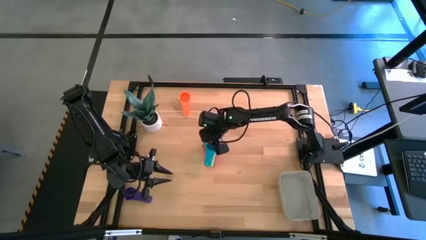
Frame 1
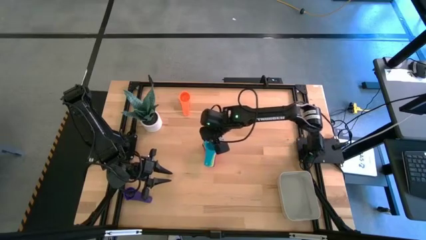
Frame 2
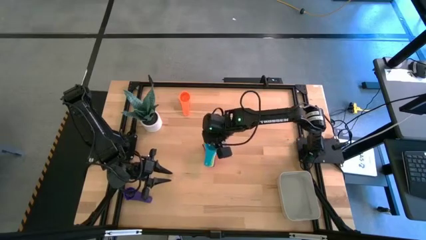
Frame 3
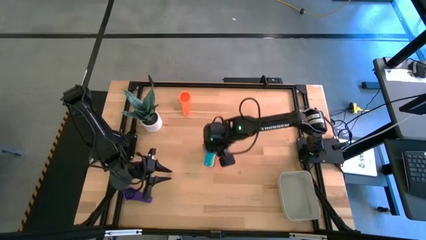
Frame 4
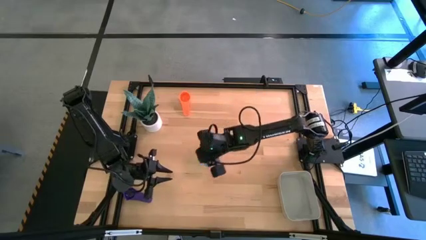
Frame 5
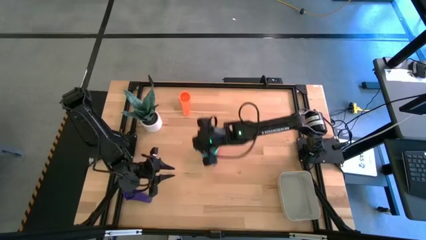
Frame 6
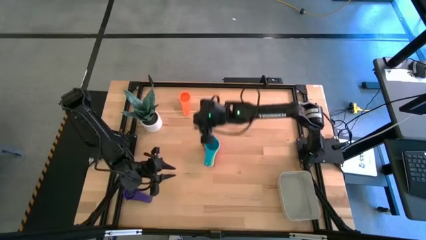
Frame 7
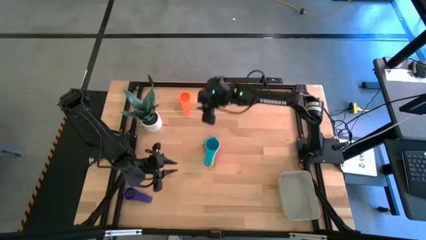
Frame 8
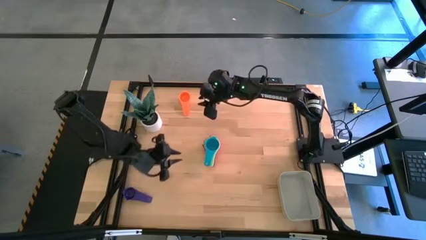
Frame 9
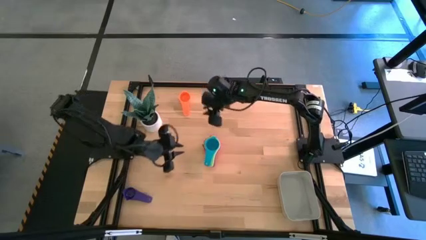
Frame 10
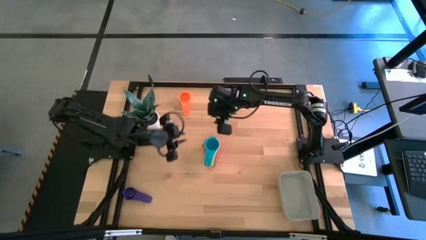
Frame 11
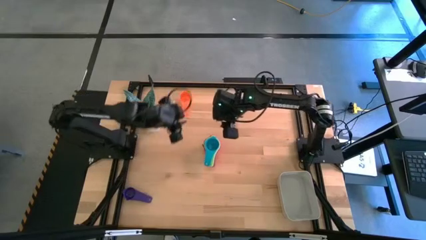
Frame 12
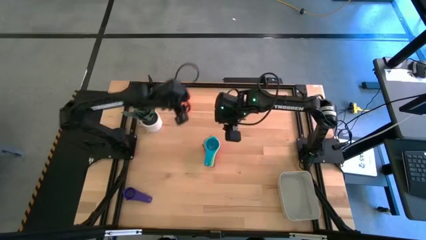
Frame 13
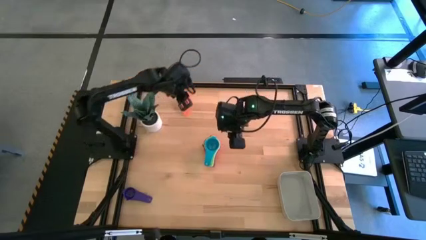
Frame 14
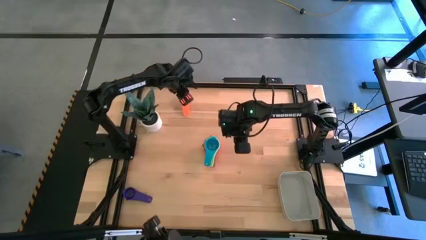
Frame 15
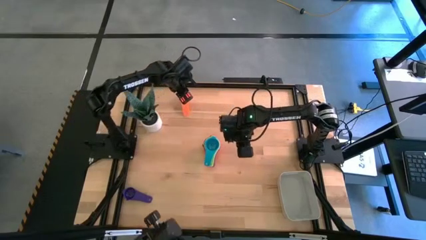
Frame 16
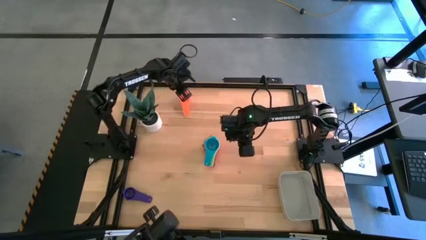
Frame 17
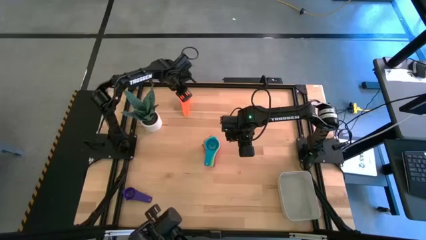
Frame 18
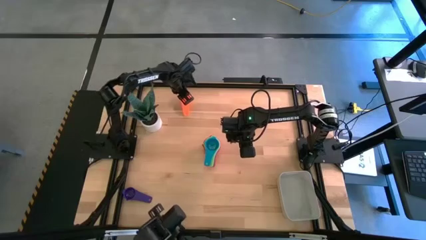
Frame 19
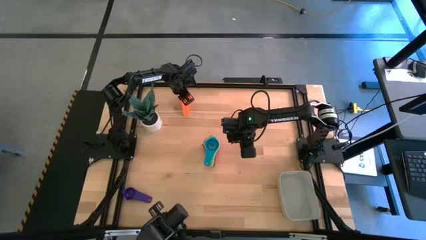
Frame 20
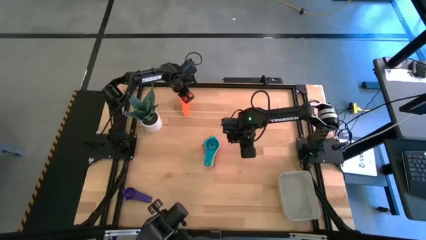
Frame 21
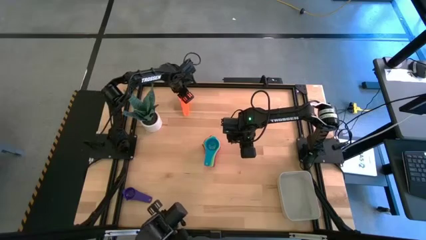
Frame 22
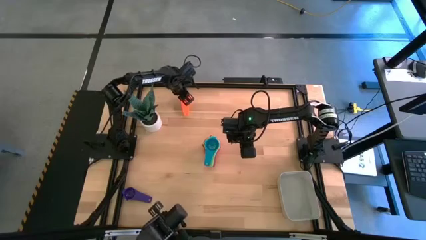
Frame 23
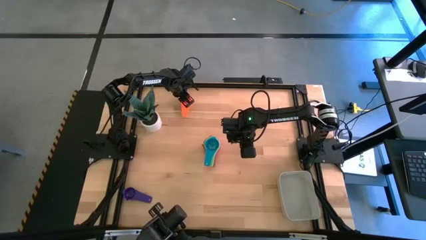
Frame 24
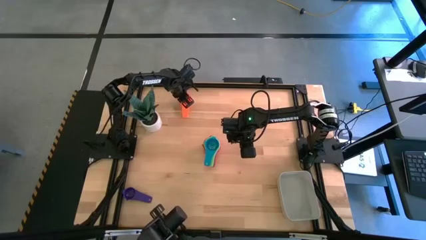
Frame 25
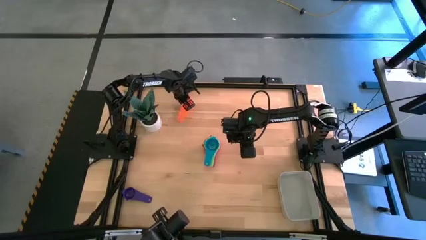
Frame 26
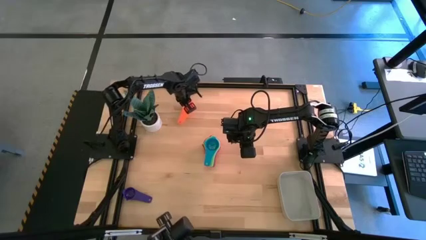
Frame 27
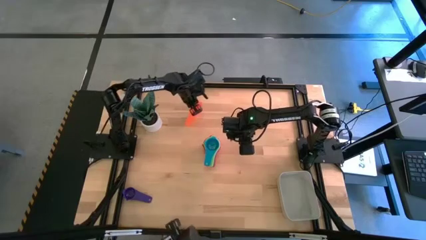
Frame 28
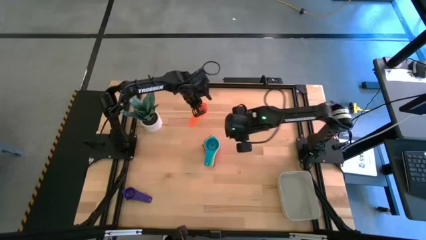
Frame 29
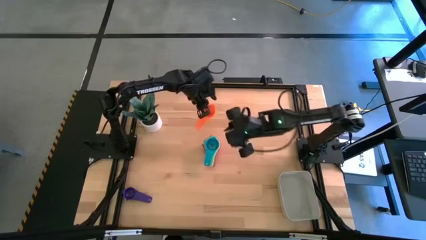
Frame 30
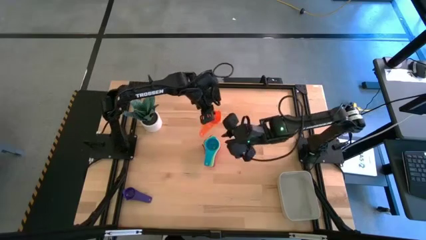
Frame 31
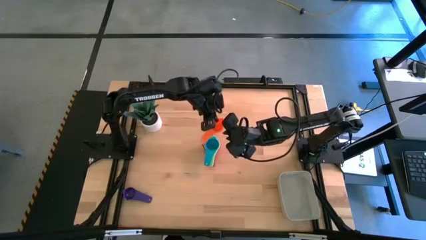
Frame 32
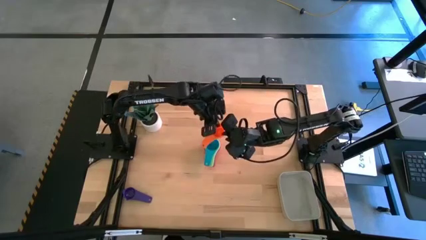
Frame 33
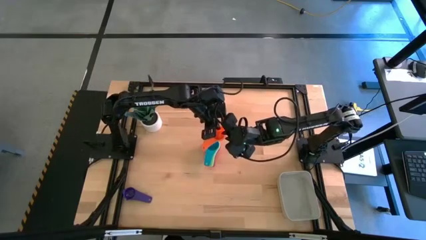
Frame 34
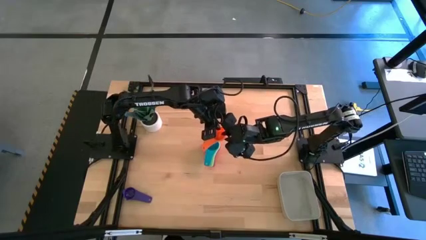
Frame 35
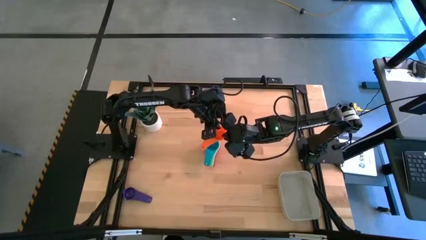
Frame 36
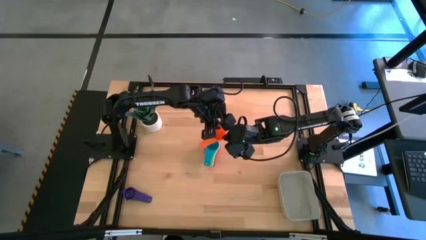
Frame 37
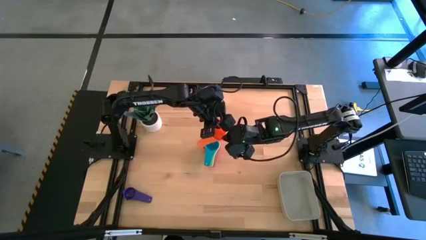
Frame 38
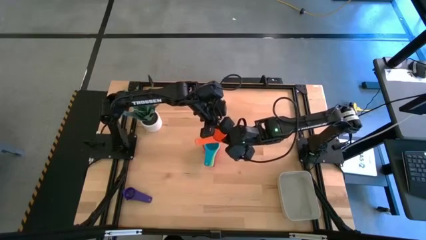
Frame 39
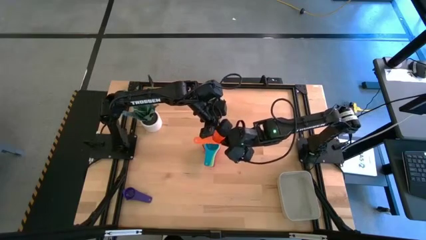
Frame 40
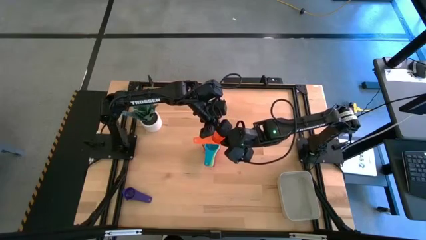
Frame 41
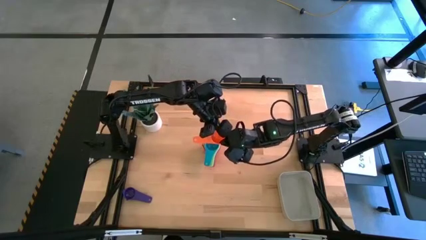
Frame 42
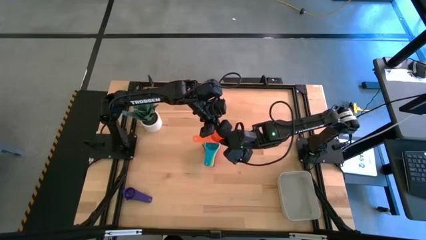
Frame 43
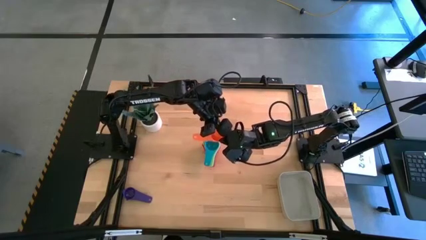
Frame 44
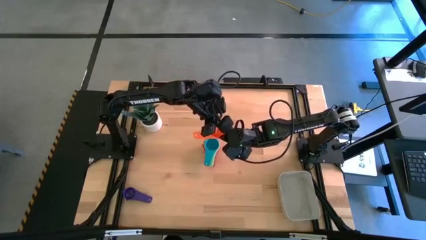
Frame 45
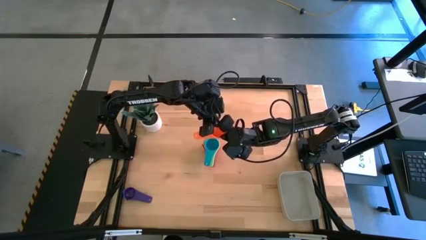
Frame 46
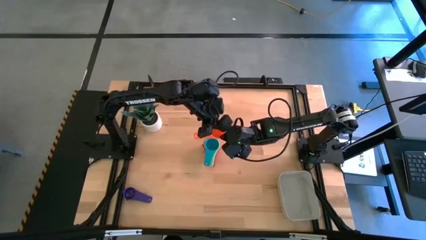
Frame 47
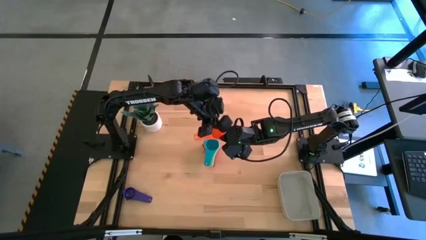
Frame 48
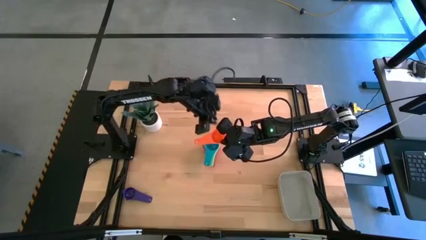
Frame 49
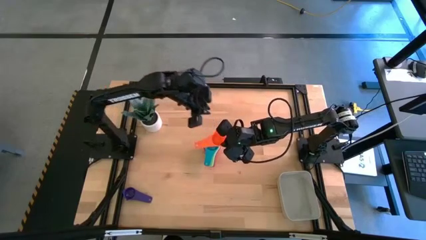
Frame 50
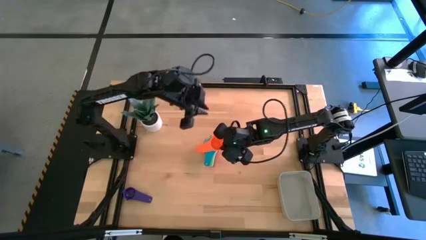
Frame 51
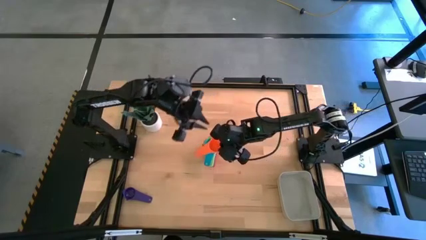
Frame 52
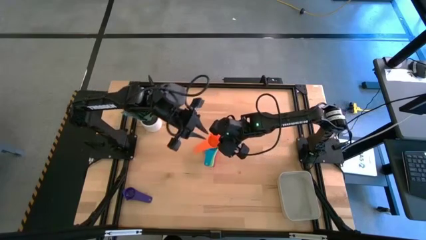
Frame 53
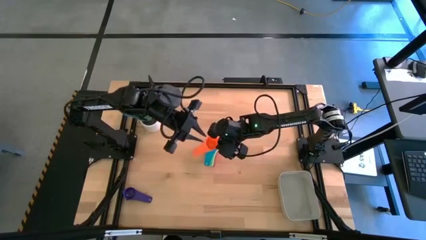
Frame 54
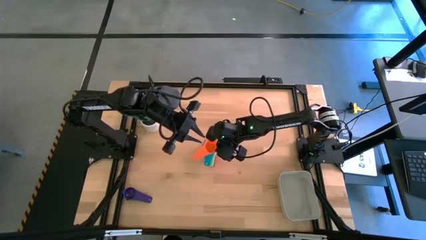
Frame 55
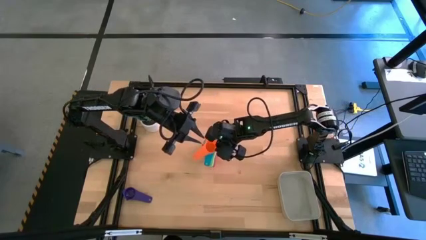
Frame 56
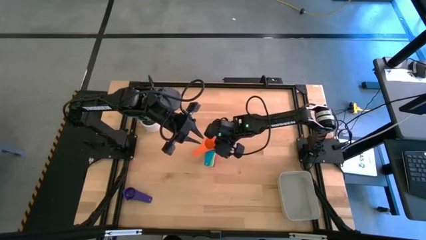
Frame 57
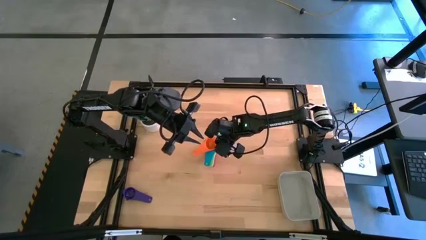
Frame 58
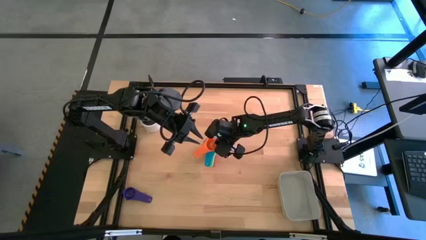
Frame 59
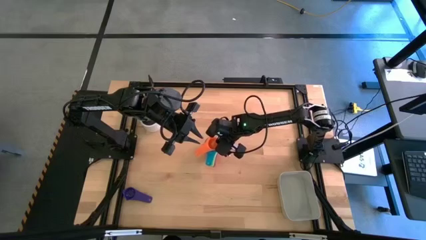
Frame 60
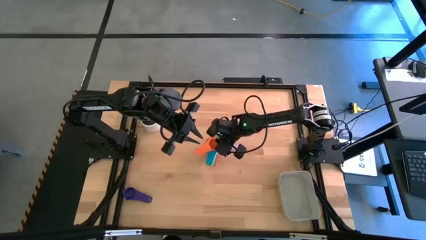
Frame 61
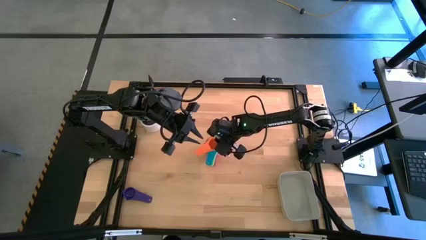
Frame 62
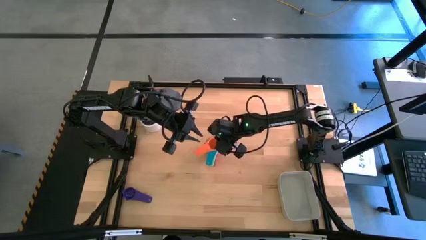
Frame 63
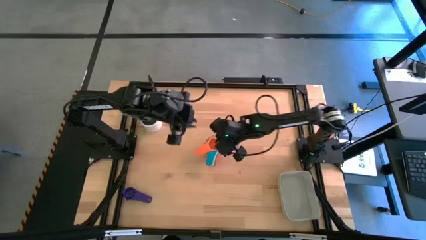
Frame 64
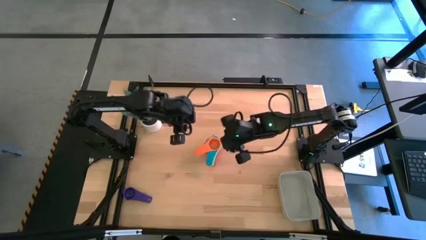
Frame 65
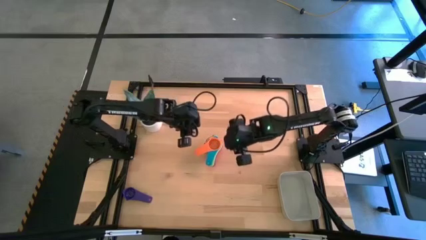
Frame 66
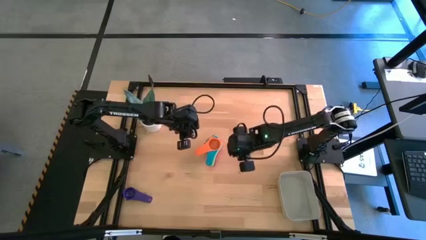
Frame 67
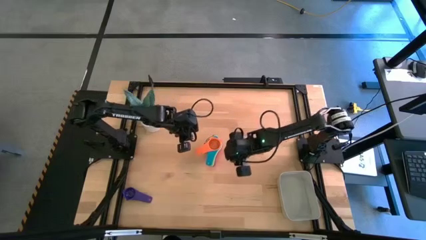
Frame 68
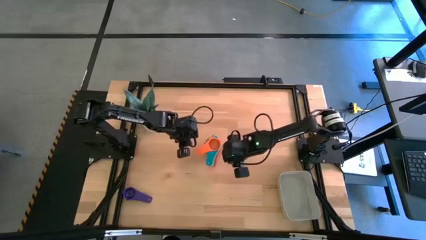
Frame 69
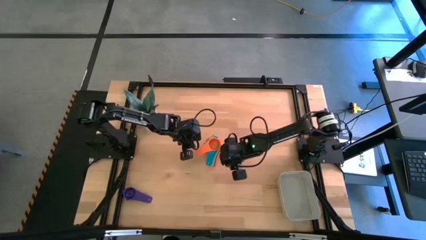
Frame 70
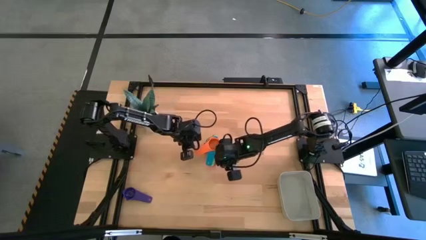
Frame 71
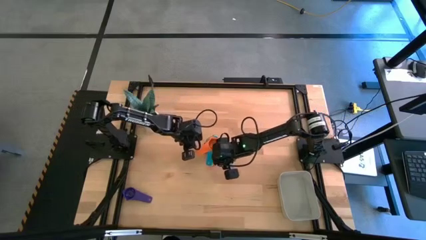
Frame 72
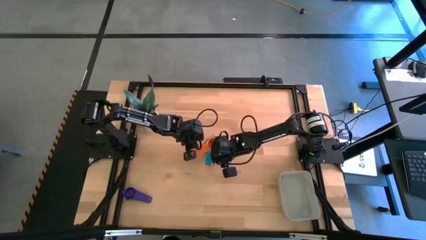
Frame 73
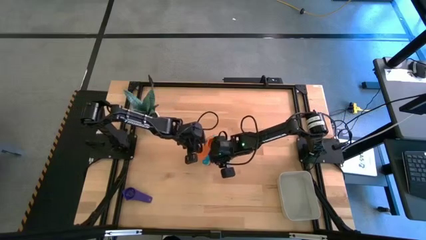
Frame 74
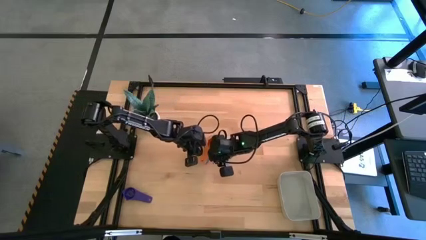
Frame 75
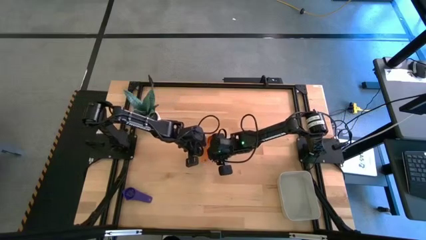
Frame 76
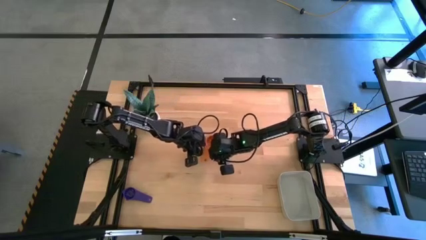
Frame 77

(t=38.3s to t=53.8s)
Task: Nest measuring cups in basket
Stack the orange measuring cup on top of the light blue measuring cup
